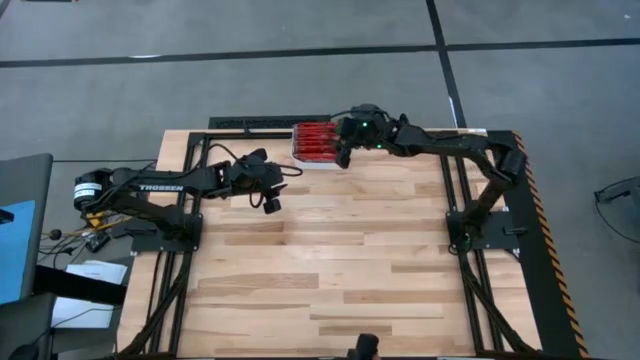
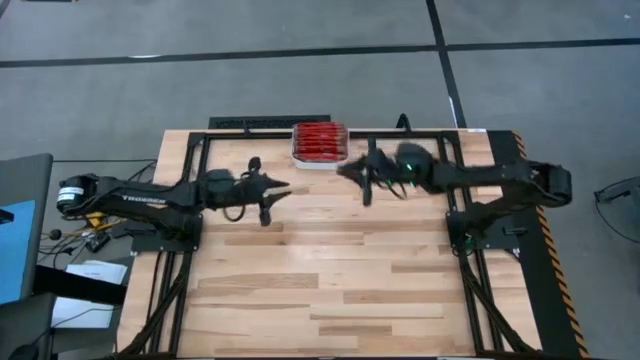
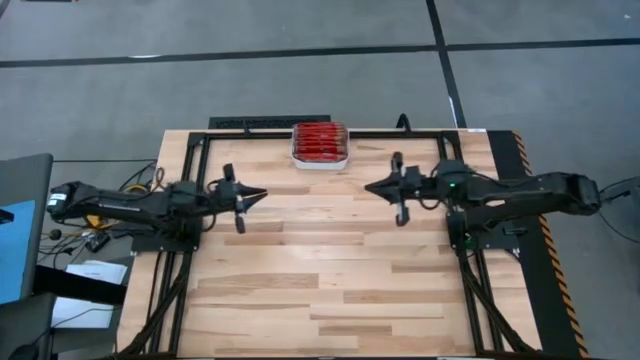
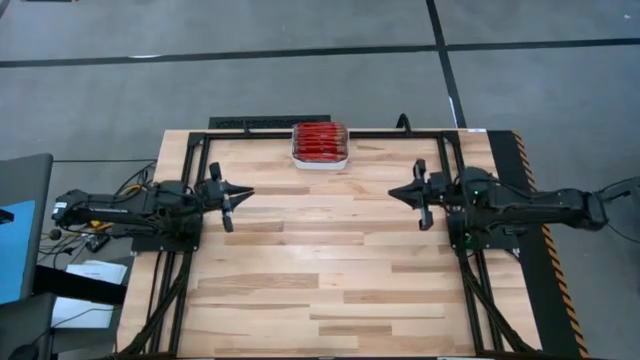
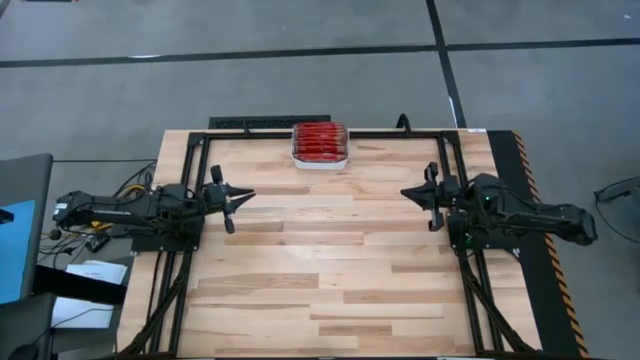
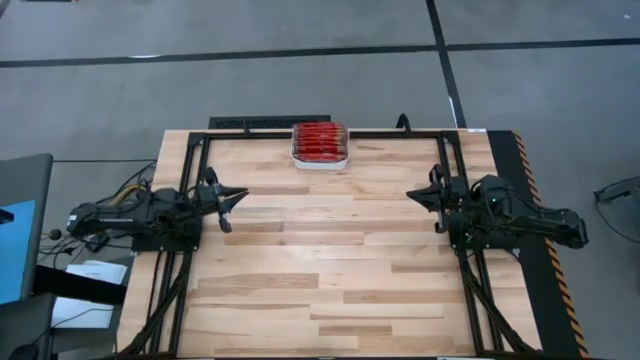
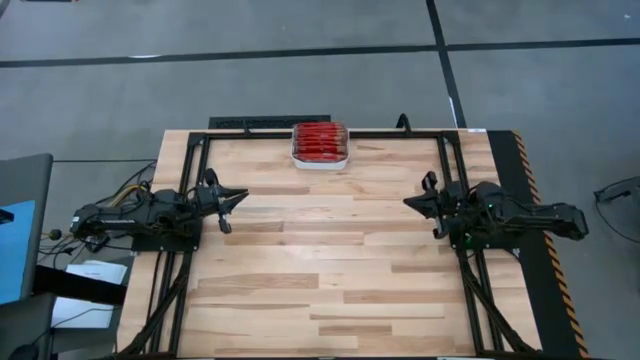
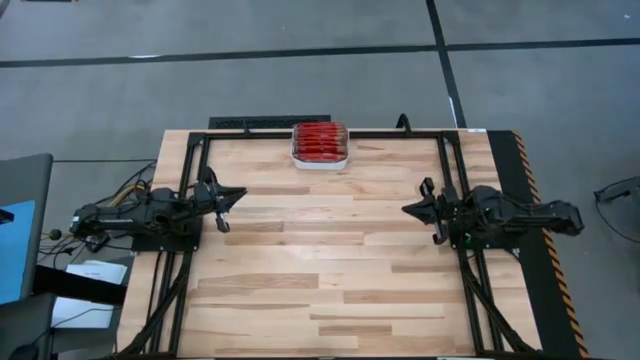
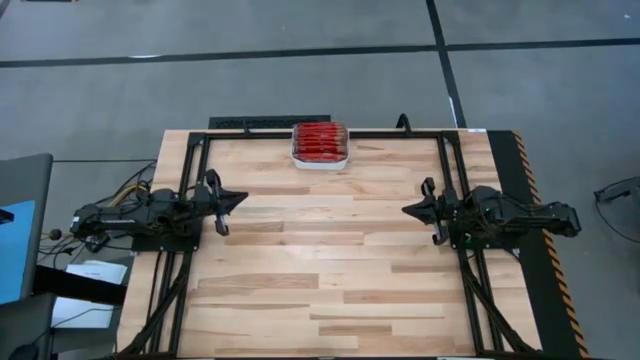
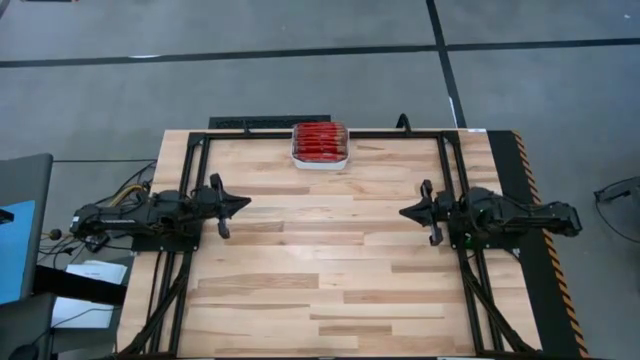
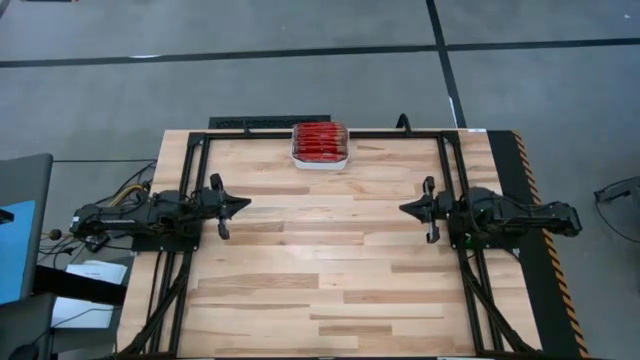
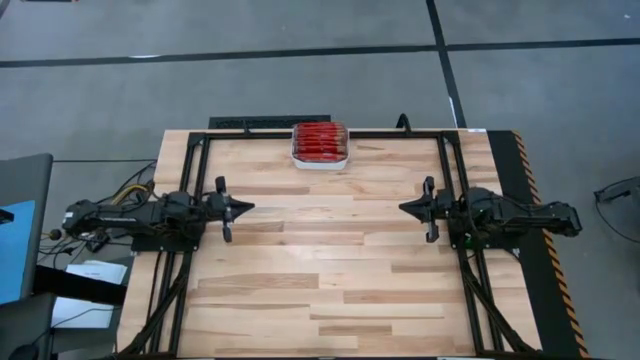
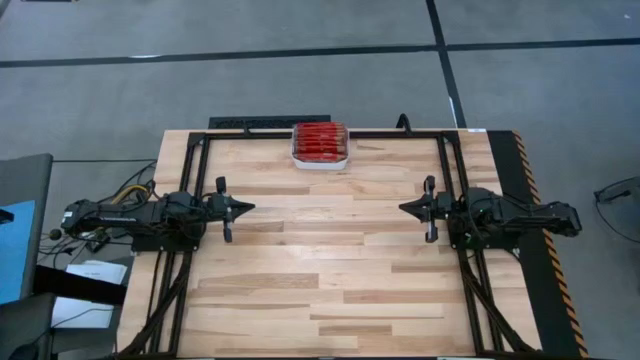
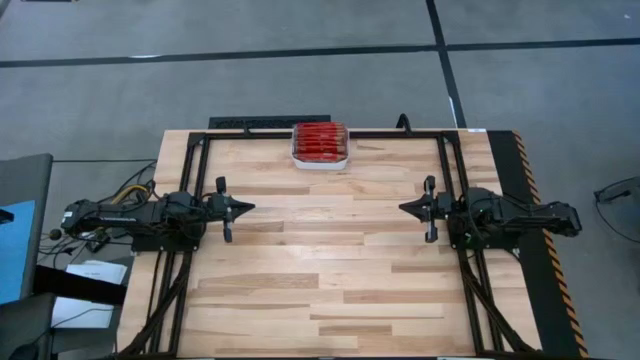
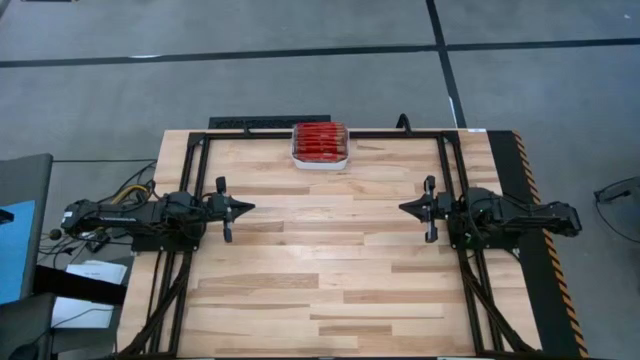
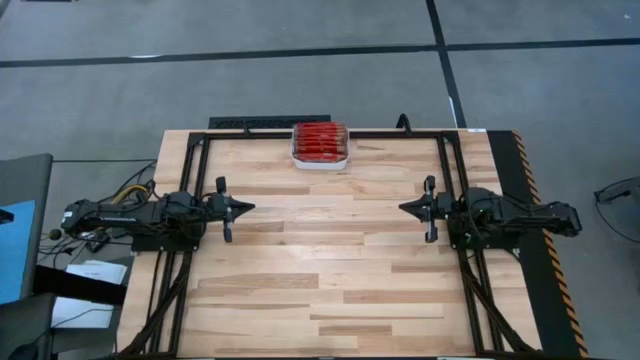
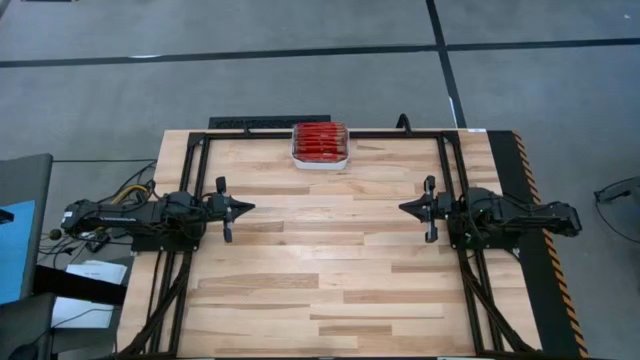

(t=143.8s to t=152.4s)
Task: Sort popcorn bags into baskets
Return to Home Position

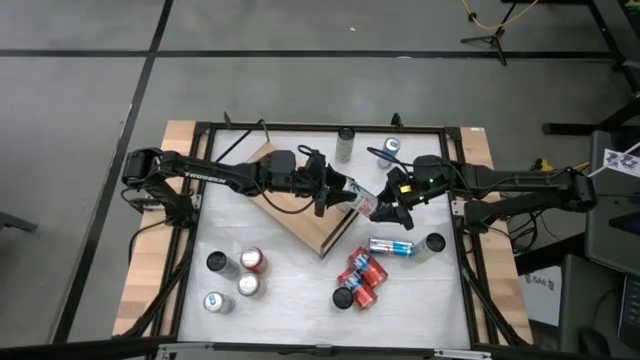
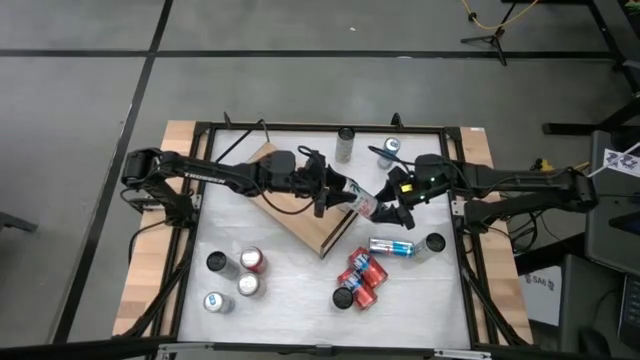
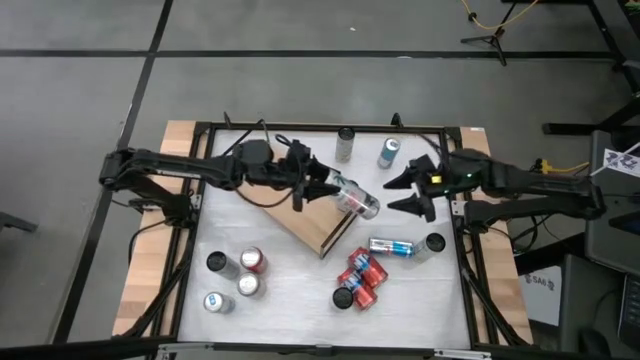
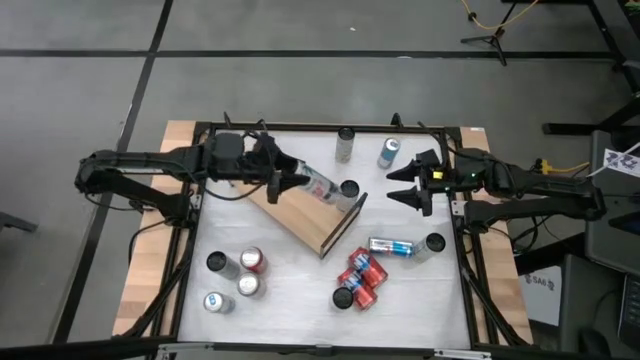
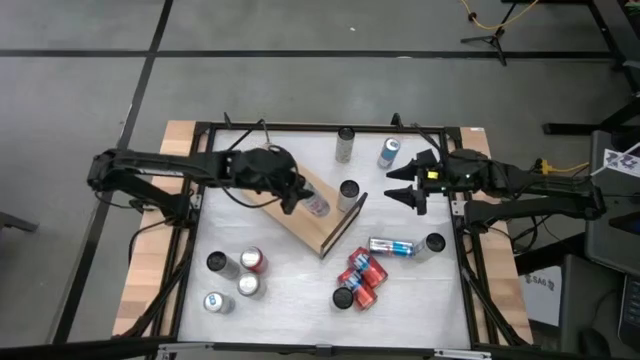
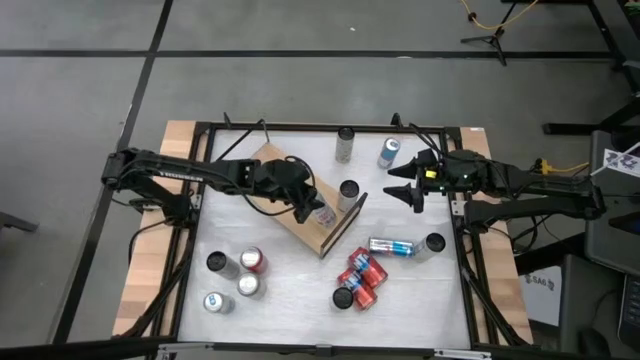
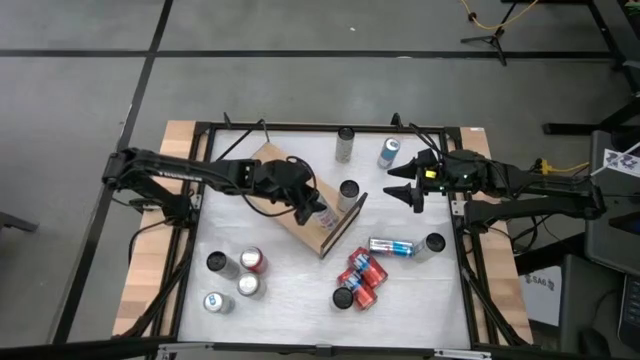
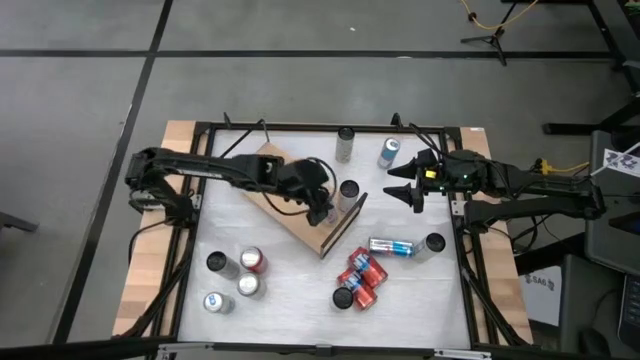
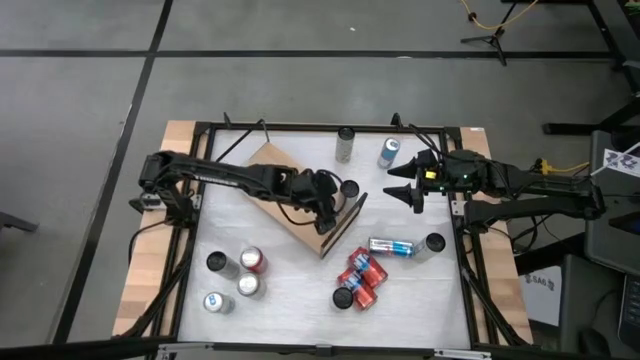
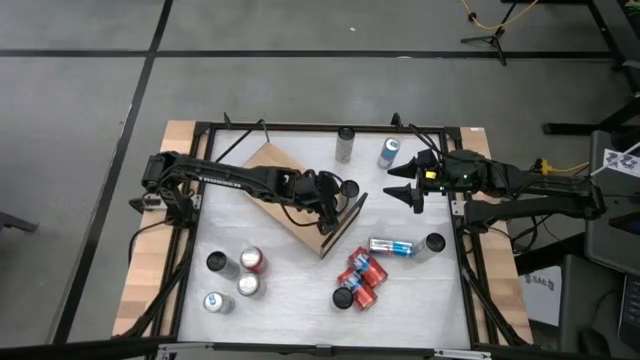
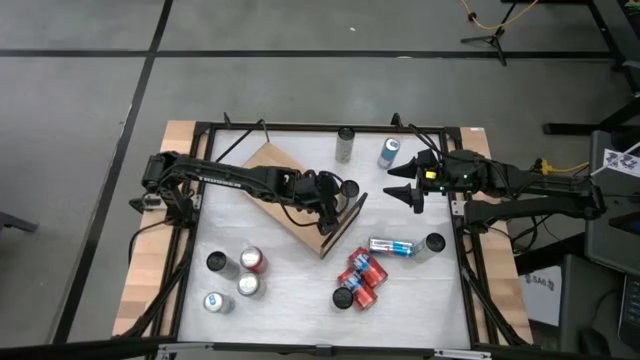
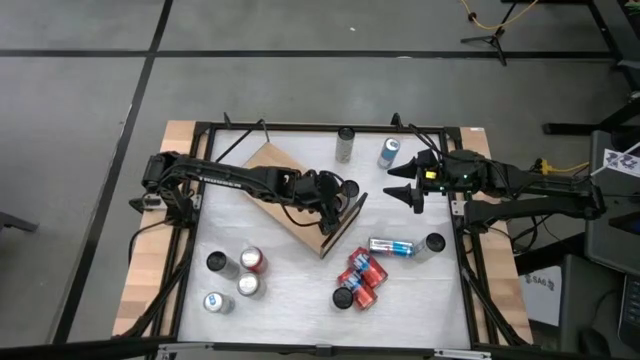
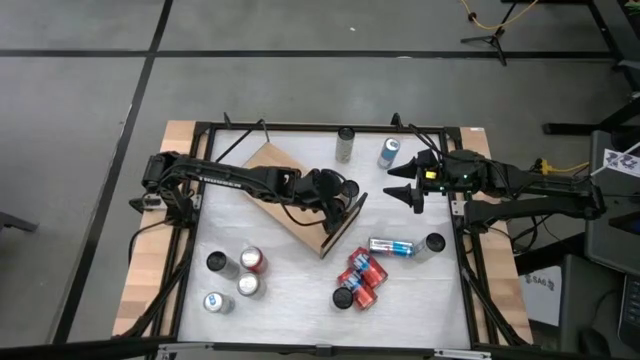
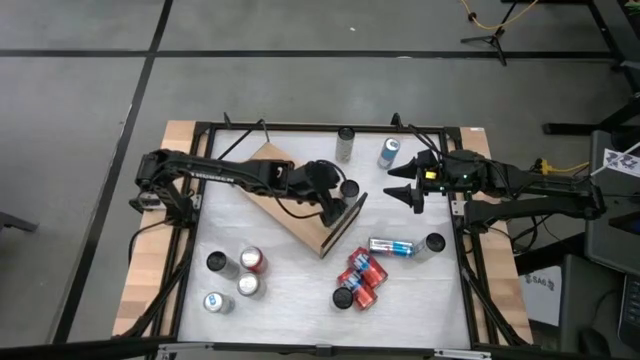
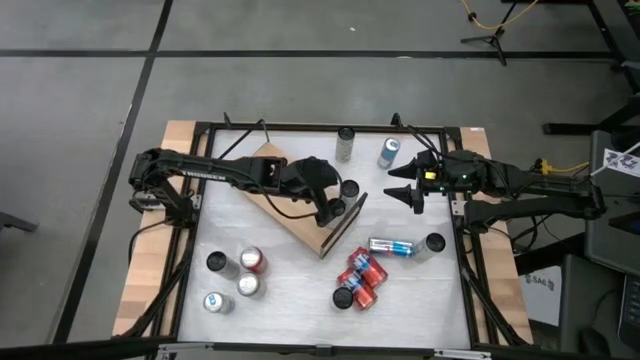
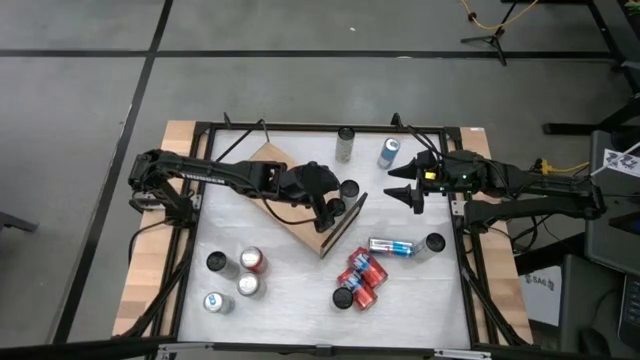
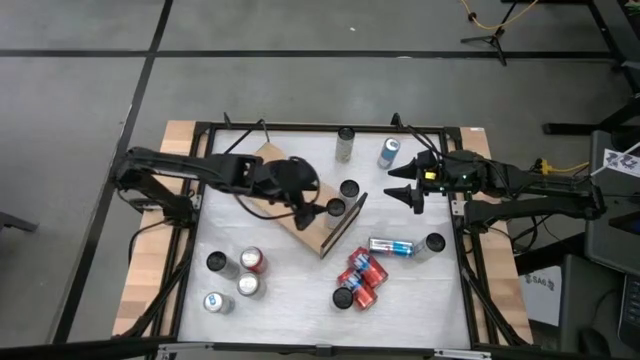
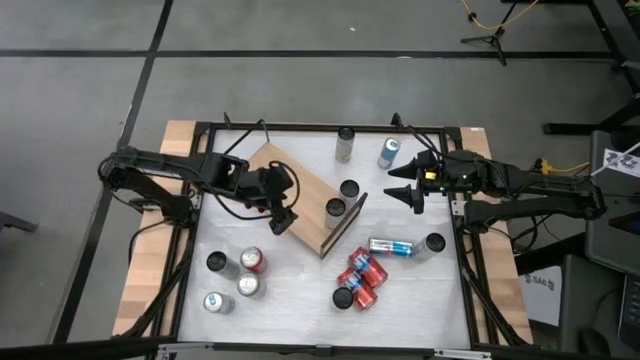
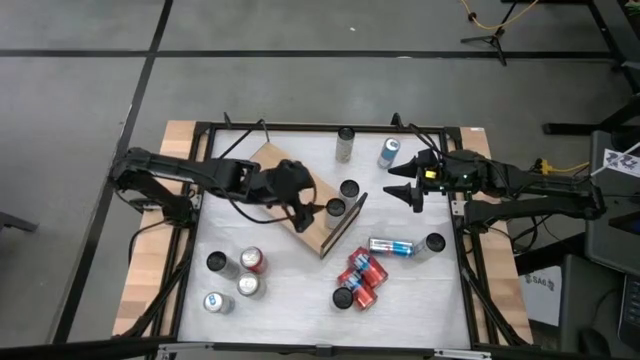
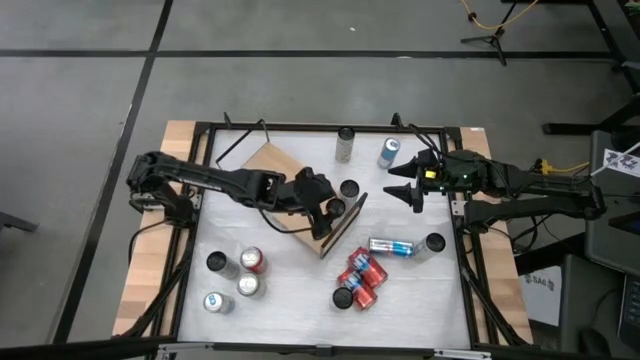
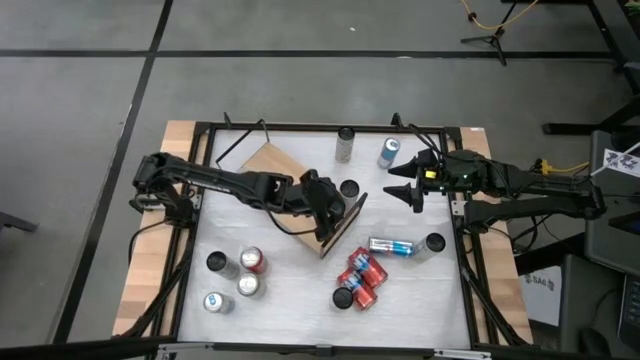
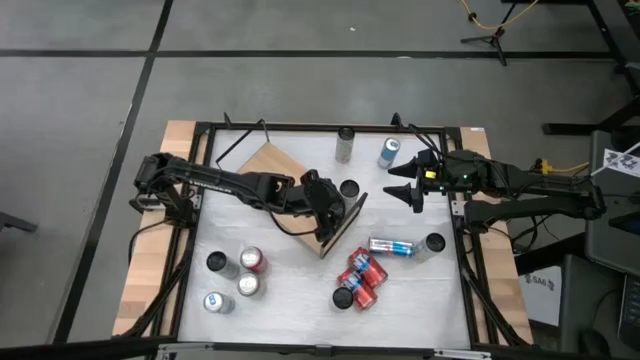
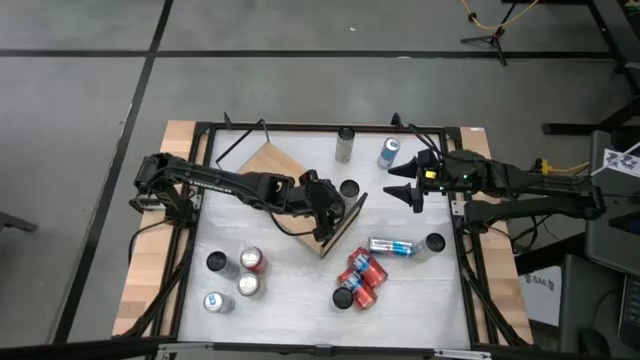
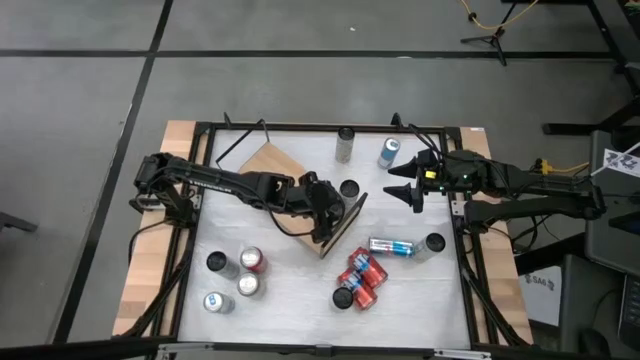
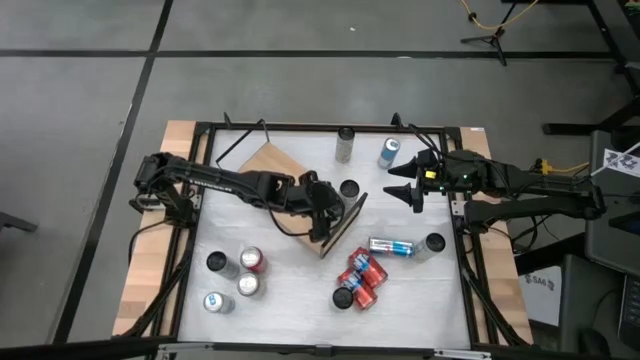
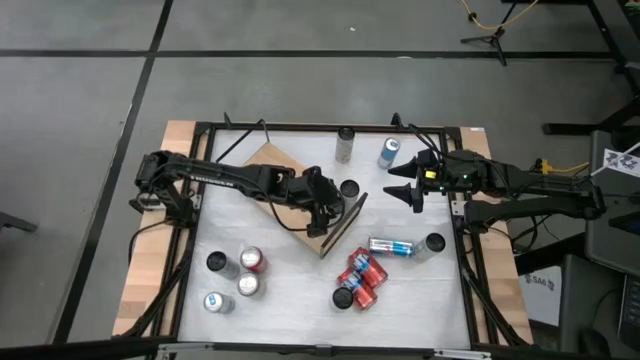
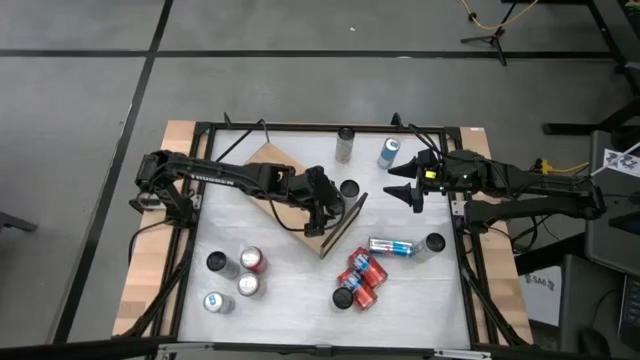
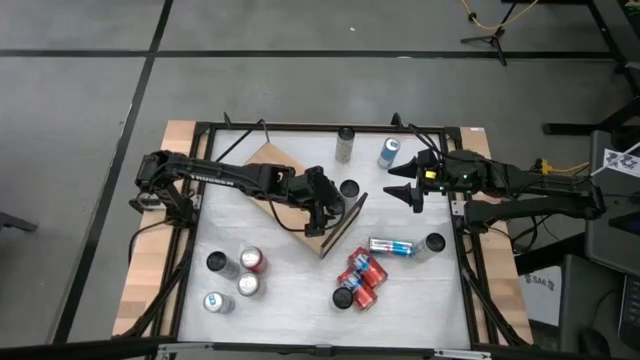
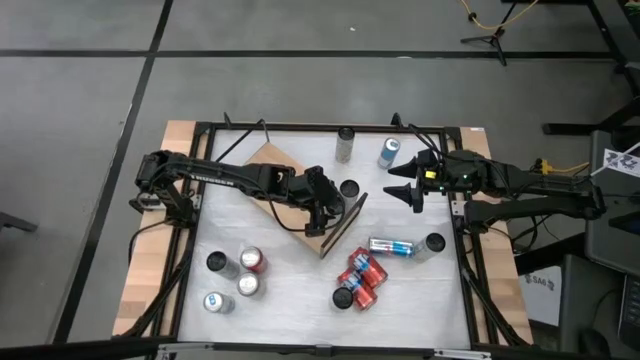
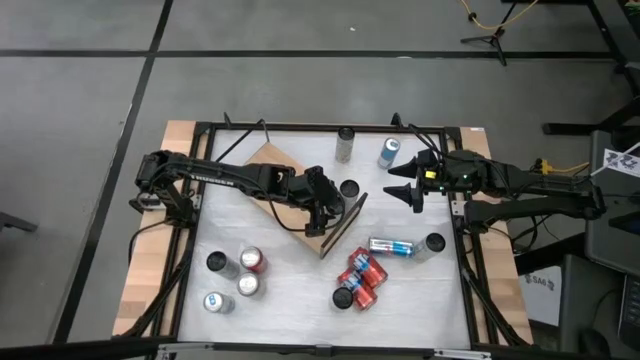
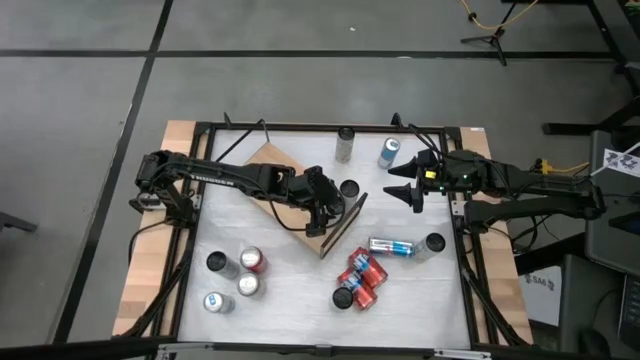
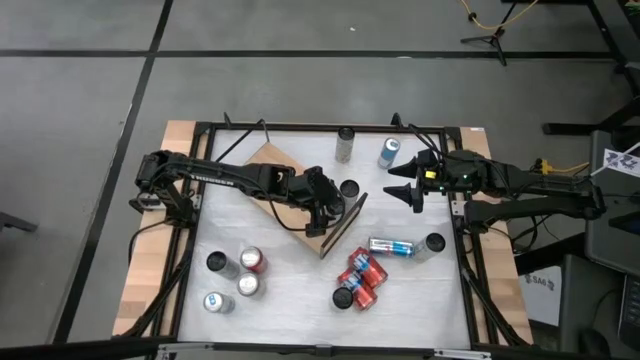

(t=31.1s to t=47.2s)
Task: Place canned beverage on shelf
Put the top white-pink soda can on the shelf aligned with the other white-pink soda can
